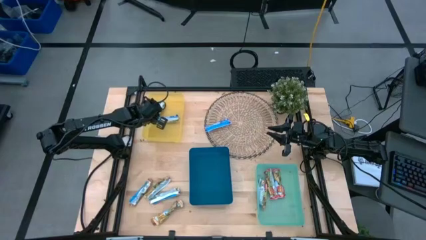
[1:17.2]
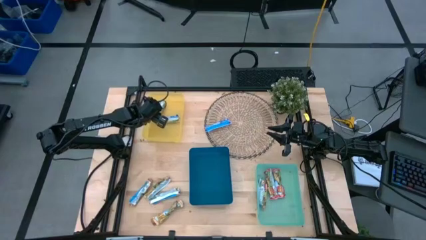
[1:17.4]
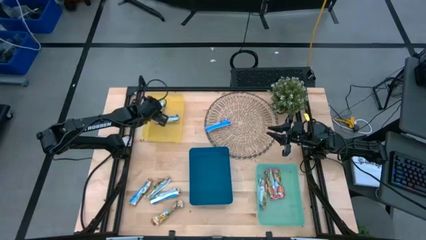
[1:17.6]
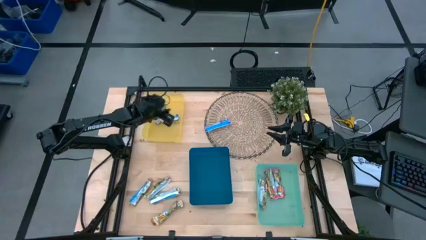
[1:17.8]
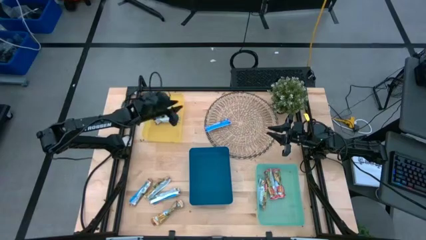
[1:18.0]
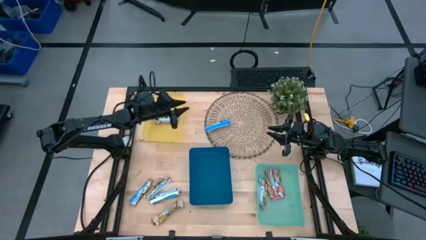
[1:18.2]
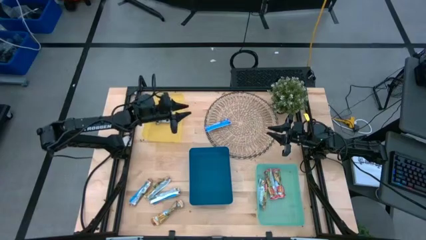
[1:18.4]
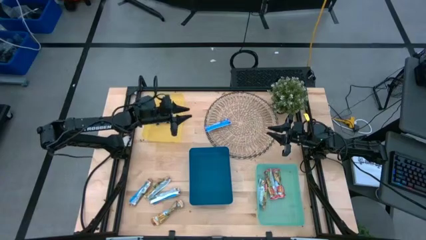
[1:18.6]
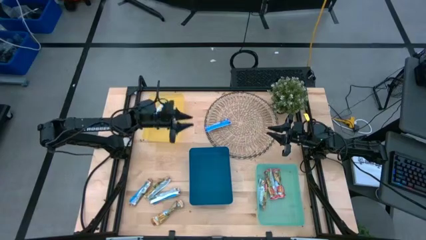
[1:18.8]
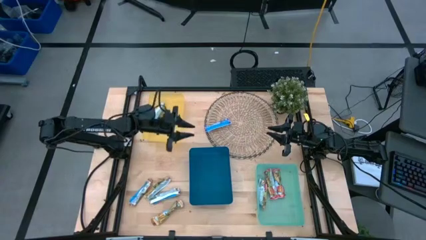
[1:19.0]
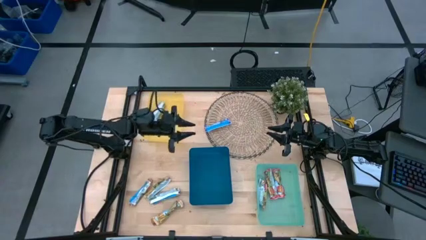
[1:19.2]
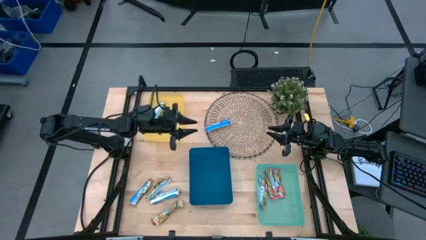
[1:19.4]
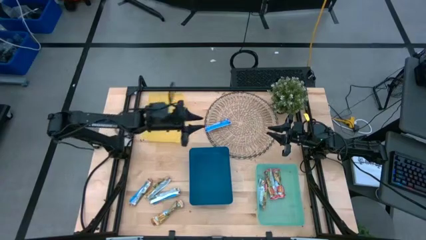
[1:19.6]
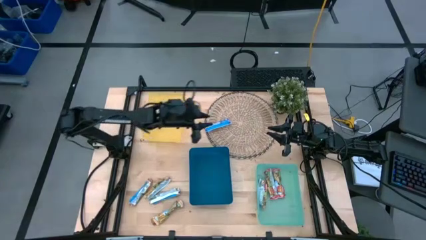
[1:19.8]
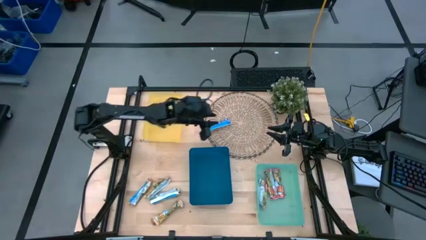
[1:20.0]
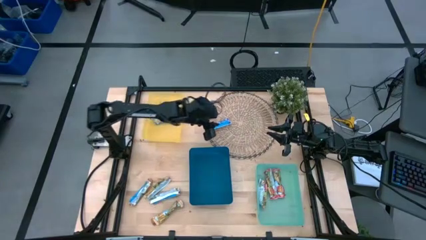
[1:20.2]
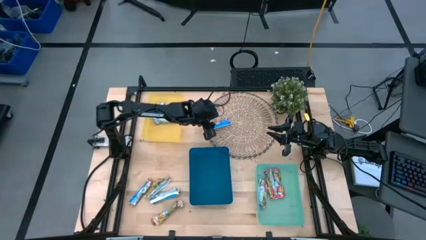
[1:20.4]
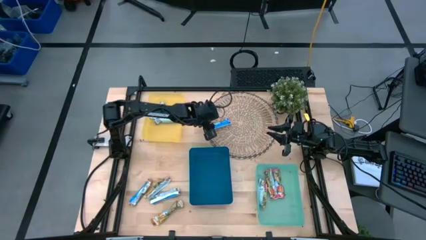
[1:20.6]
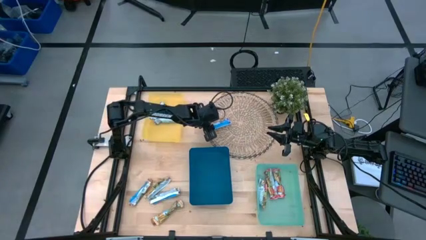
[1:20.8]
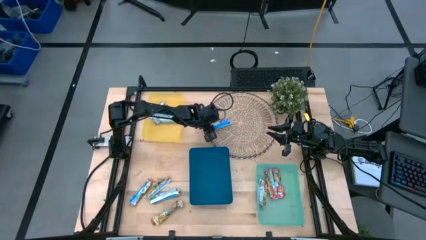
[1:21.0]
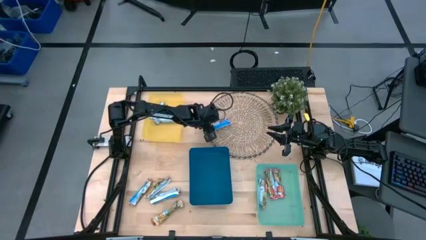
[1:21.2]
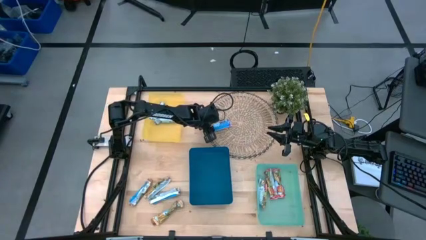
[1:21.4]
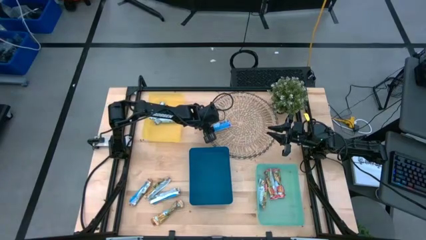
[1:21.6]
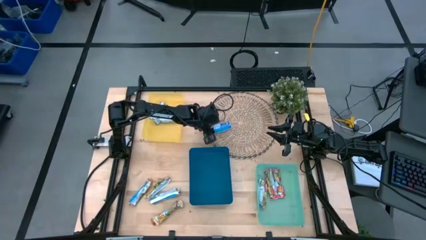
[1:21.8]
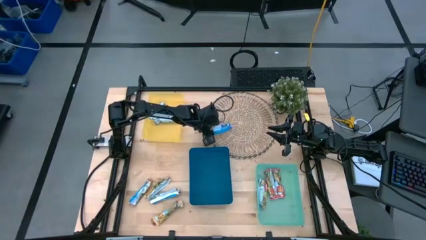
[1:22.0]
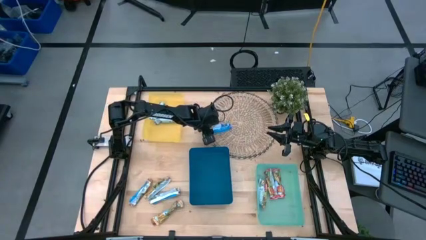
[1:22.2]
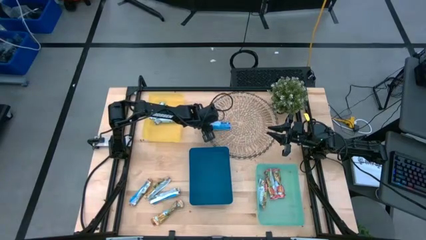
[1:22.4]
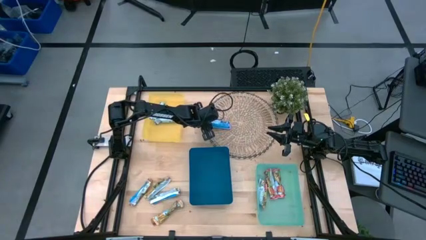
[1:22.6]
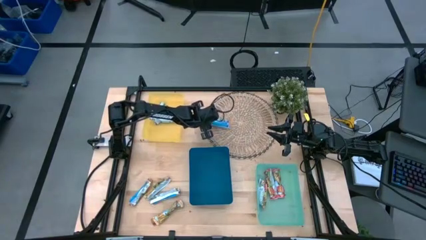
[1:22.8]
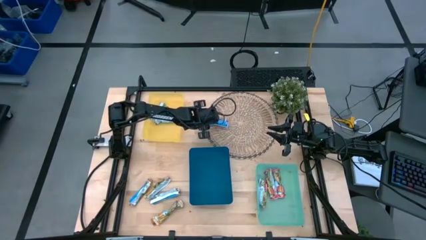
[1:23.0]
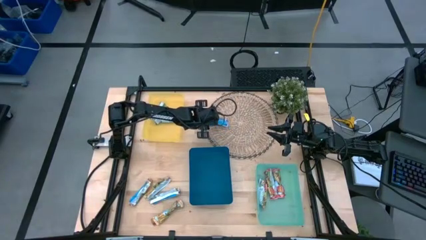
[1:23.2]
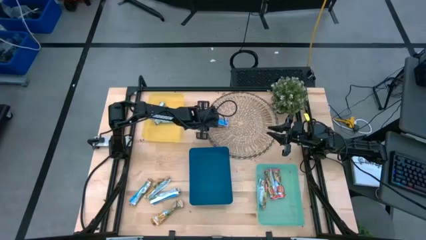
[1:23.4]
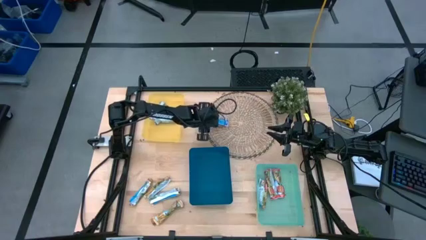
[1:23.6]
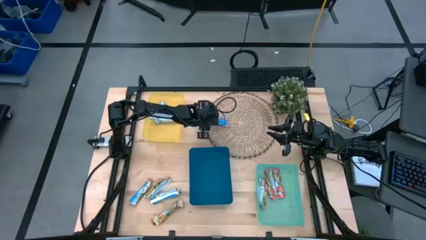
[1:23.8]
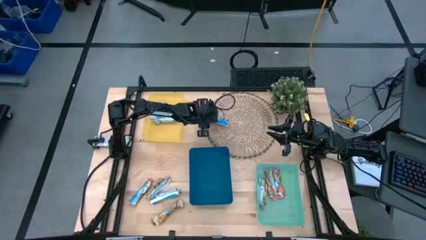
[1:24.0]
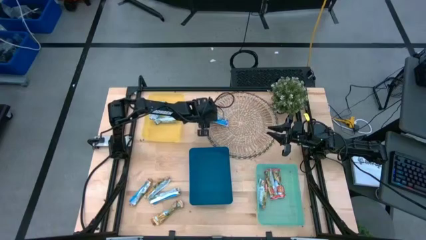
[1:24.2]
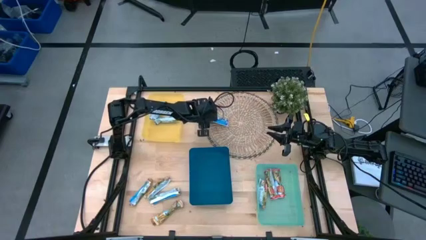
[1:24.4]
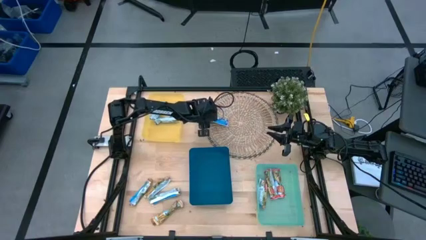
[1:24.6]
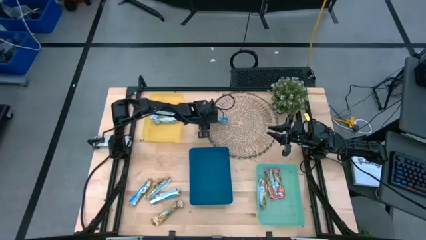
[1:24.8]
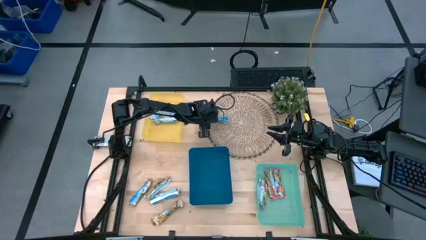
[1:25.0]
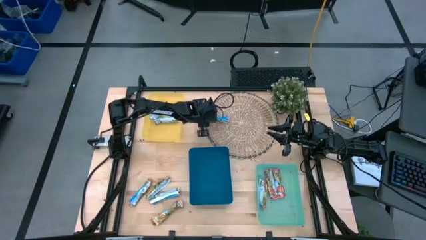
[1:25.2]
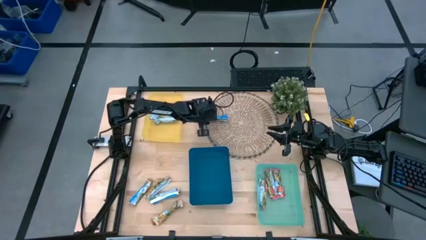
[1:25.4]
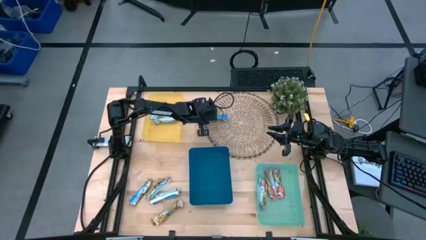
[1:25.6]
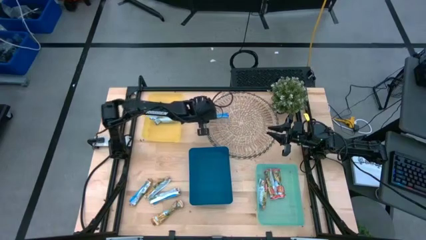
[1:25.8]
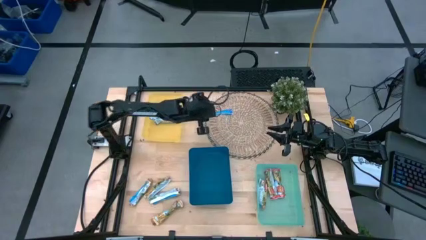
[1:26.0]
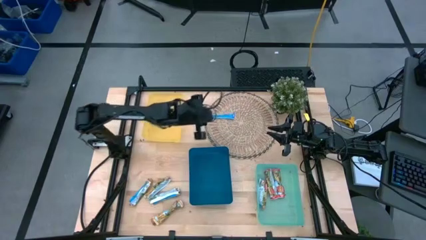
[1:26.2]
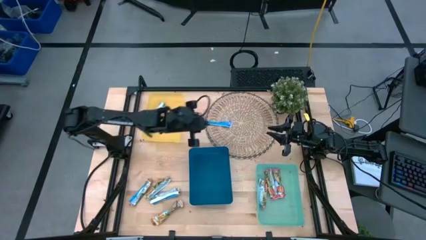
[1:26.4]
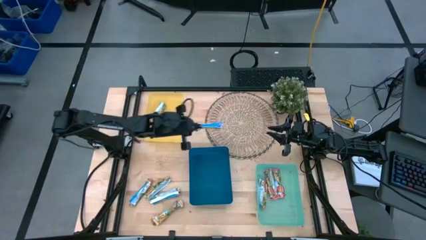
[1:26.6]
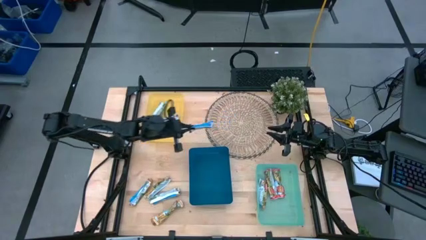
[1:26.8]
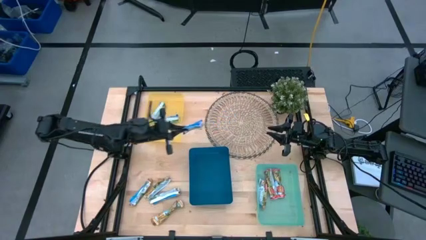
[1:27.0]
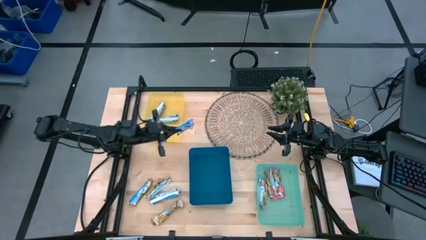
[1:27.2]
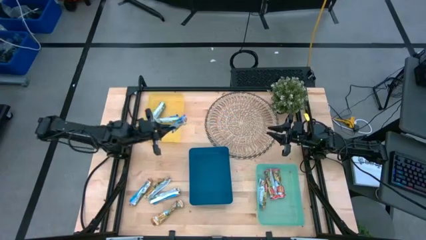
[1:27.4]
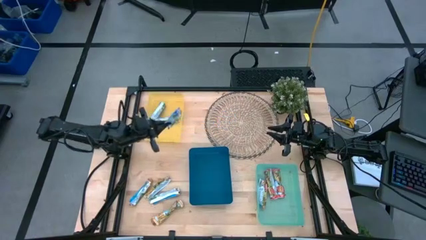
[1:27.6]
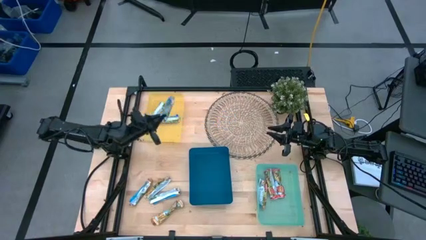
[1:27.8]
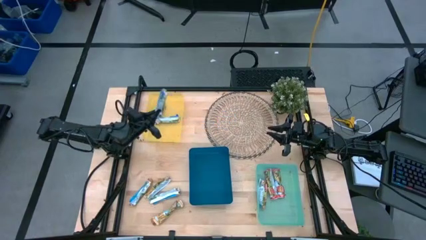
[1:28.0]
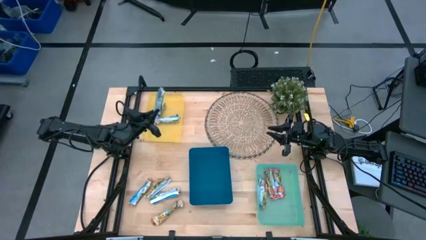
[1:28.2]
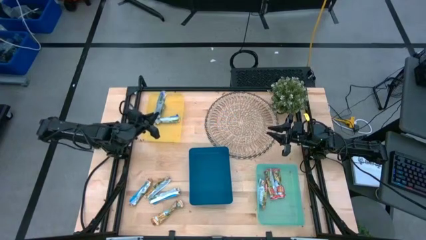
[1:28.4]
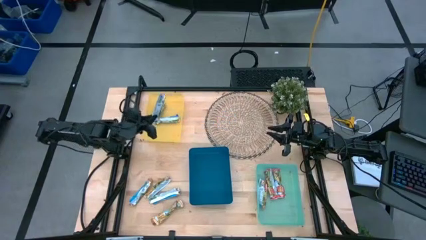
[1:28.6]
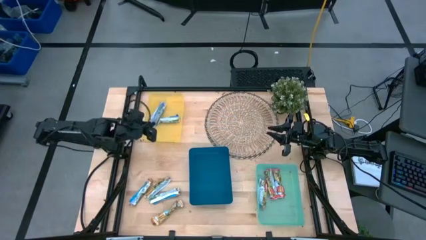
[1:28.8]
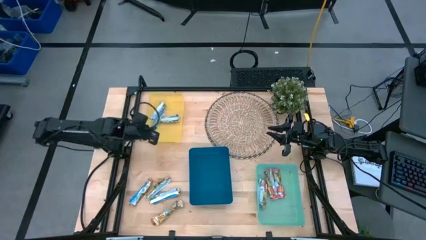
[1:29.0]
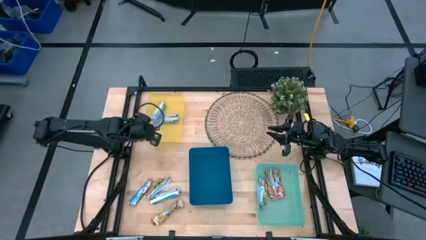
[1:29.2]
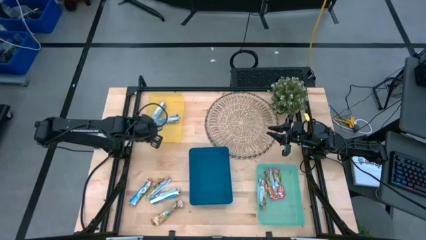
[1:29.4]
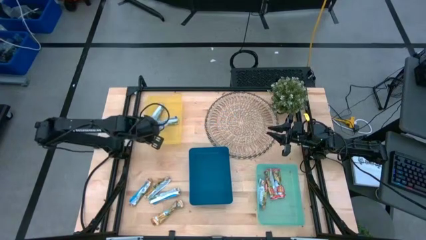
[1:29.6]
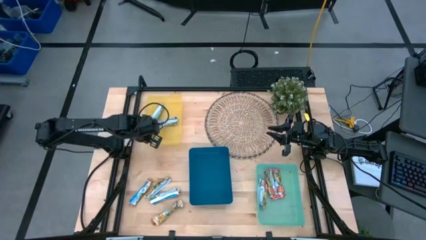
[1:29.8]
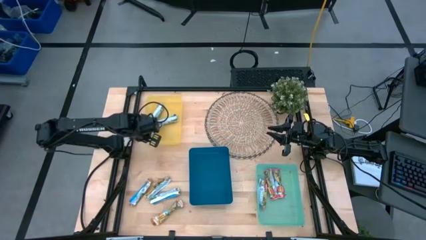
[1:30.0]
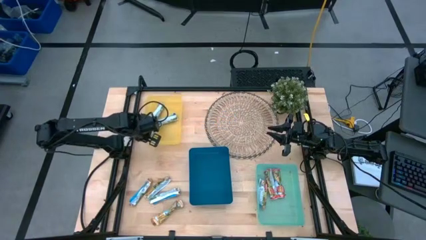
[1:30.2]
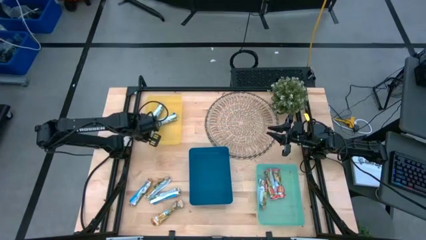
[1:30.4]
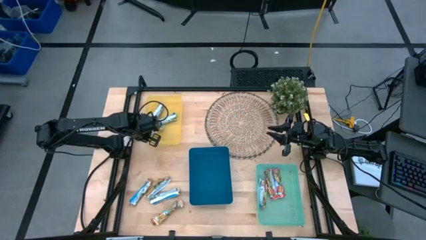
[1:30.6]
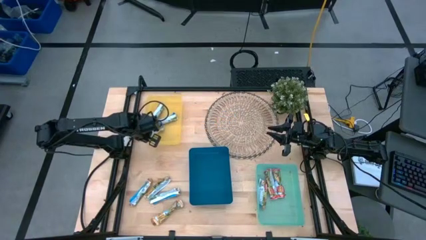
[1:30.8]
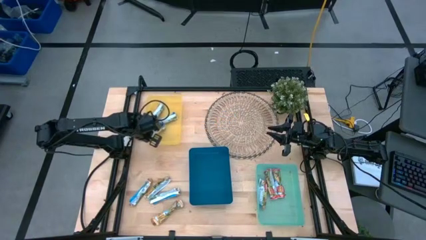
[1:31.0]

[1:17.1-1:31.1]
Task: Pick and place Granola Bars by type
Put the blue granola bar into the yellow bin

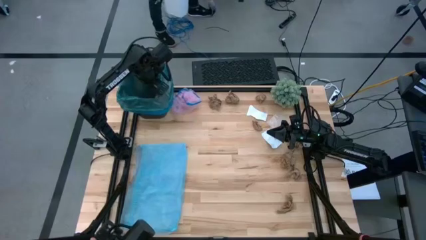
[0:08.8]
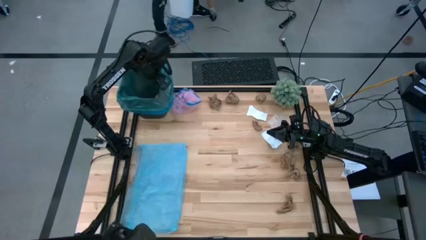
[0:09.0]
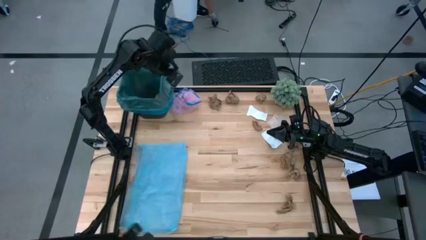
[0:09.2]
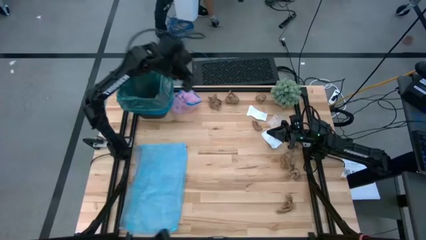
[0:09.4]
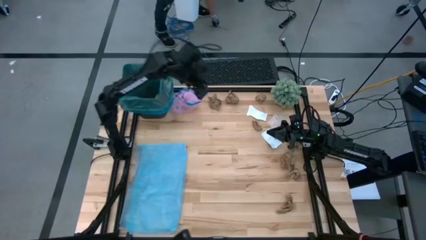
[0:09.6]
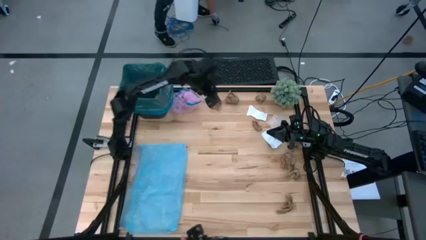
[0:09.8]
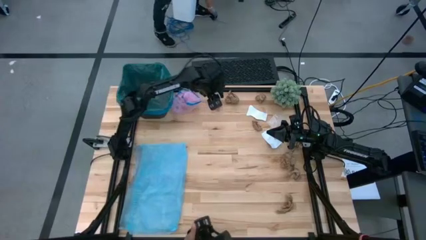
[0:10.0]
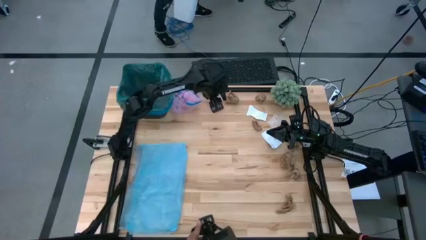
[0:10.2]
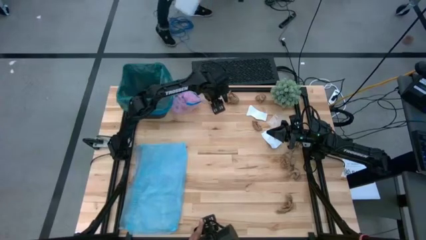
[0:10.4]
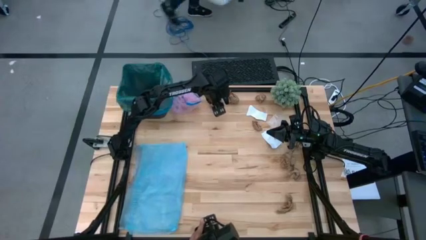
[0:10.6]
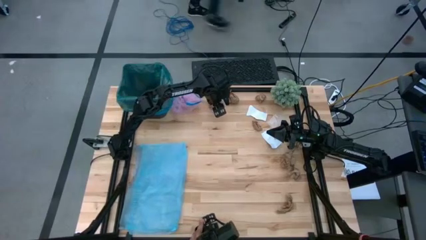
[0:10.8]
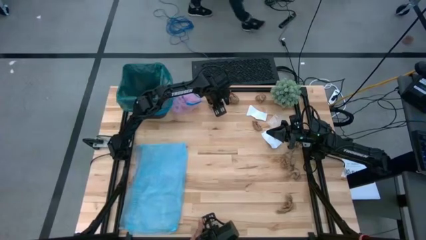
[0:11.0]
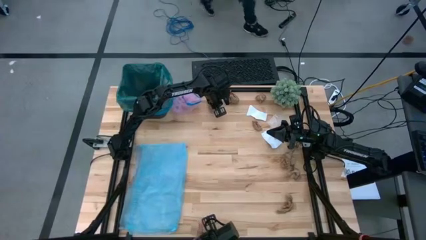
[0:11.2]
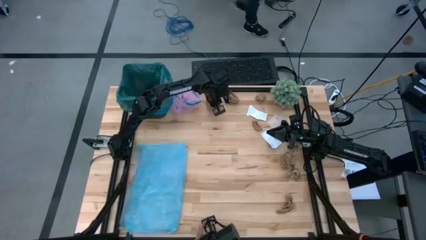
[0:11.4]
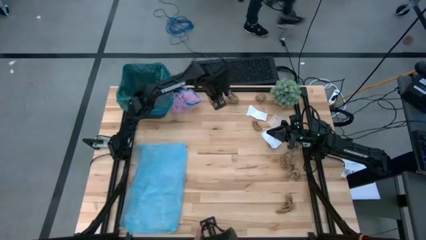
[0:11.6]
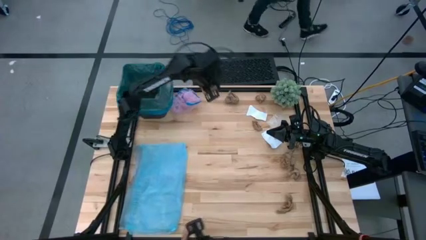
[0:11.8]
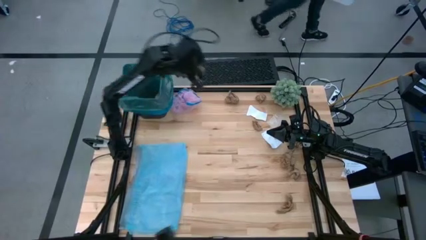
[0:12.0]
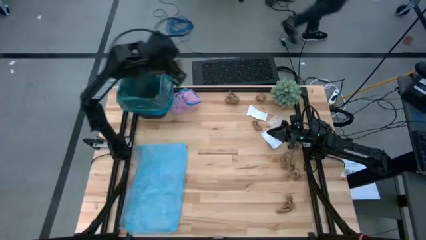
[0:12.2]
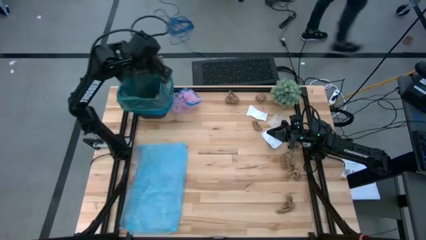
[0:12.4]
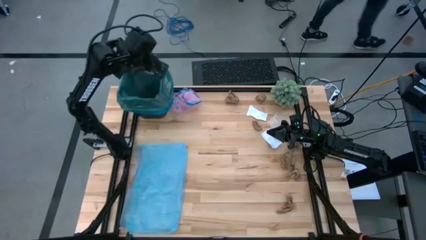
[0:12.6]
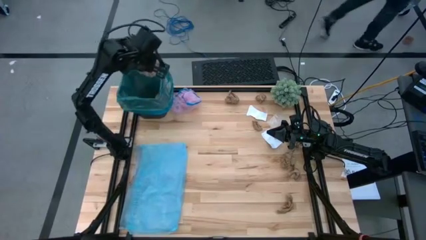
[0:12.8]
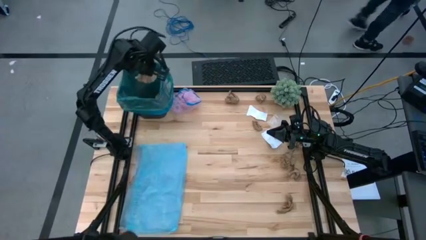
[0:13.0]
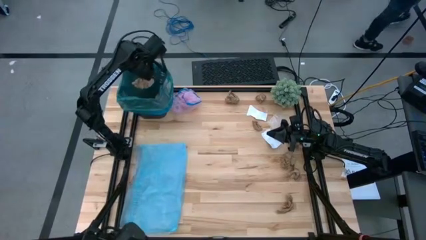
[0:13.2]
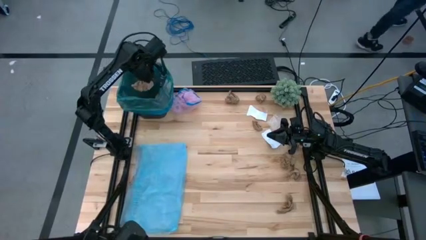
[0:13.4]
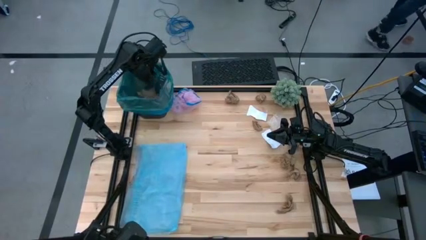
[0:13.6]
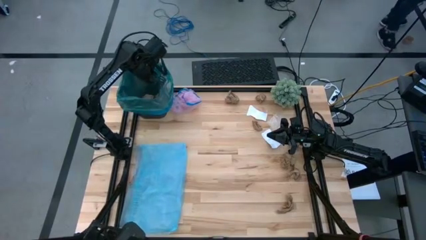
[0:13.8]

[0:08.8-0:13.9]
Task: place trash/remove bag and relplace
Put the brown napkin into the trash bin
